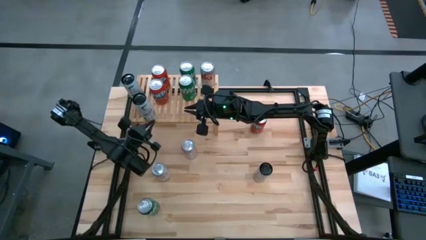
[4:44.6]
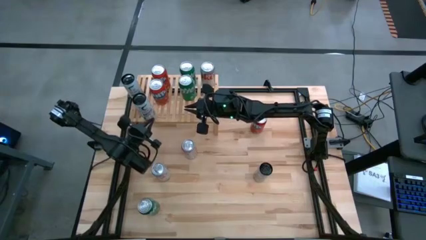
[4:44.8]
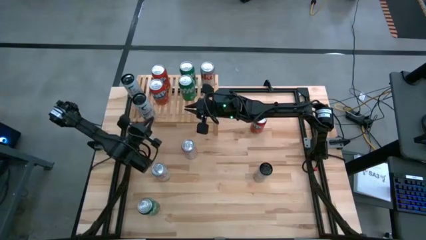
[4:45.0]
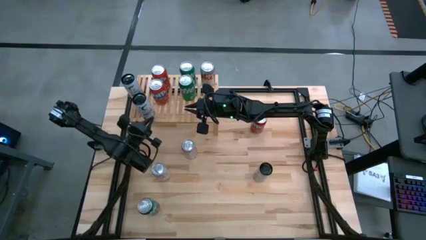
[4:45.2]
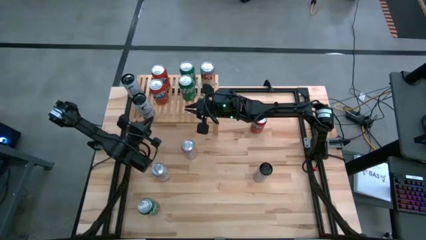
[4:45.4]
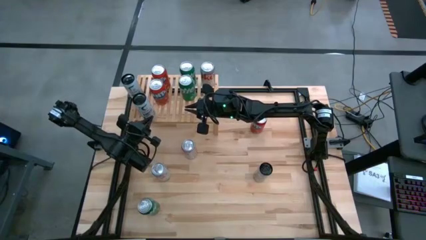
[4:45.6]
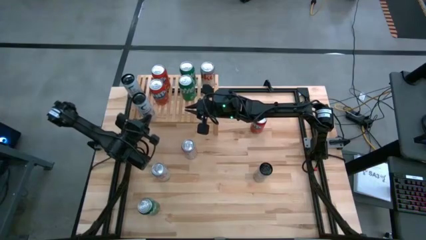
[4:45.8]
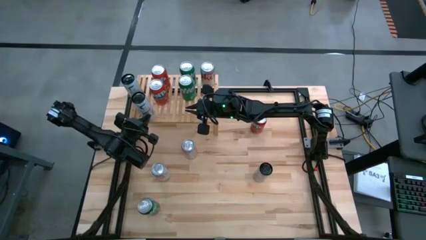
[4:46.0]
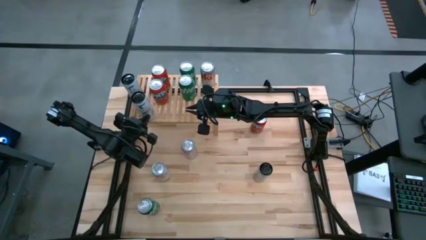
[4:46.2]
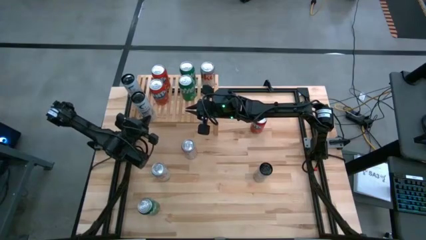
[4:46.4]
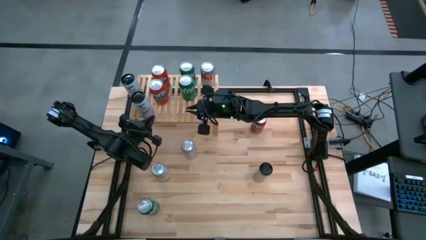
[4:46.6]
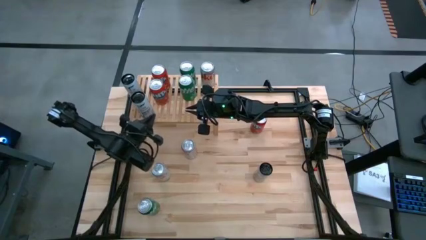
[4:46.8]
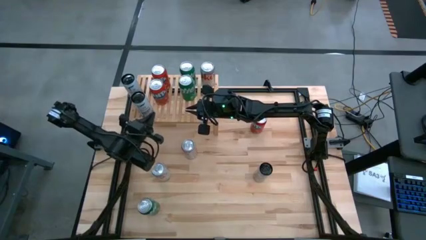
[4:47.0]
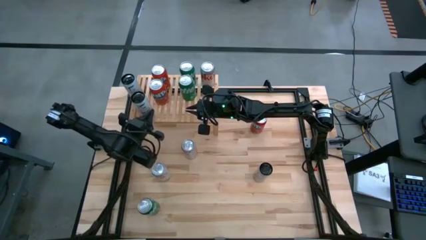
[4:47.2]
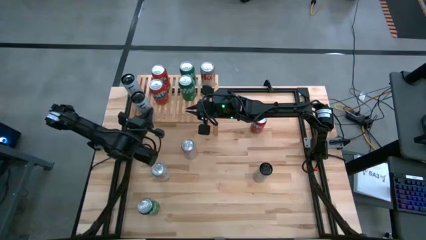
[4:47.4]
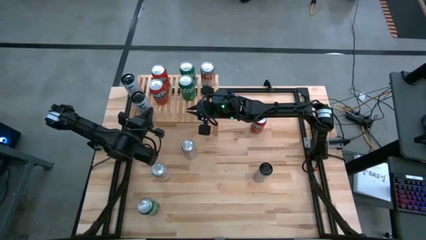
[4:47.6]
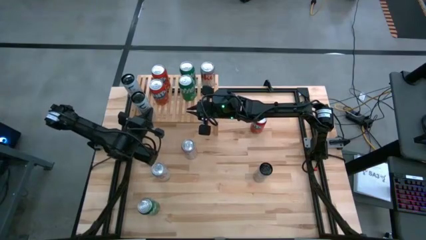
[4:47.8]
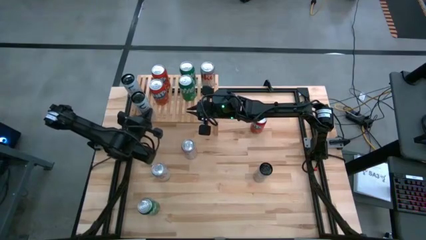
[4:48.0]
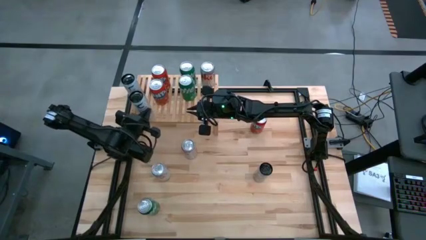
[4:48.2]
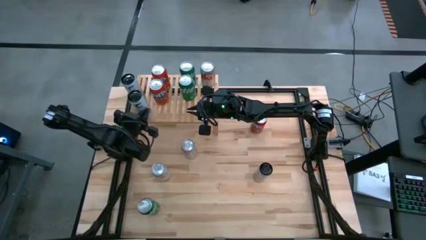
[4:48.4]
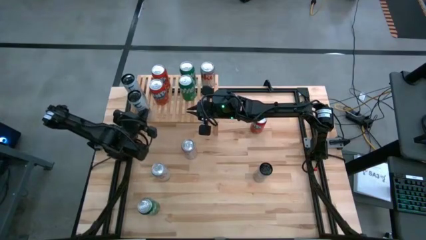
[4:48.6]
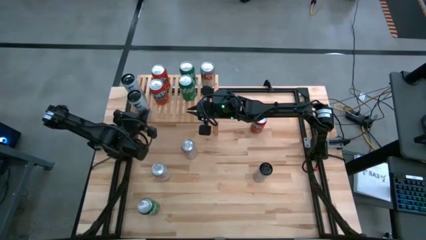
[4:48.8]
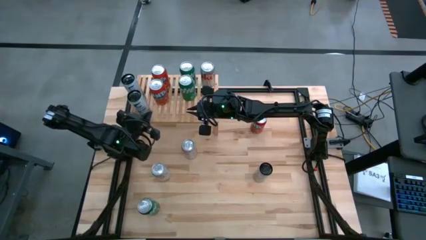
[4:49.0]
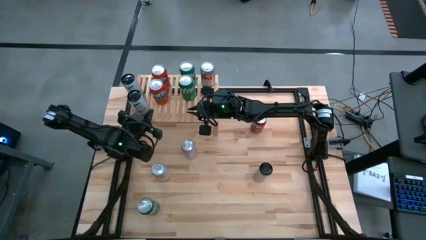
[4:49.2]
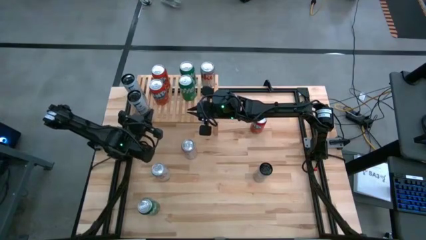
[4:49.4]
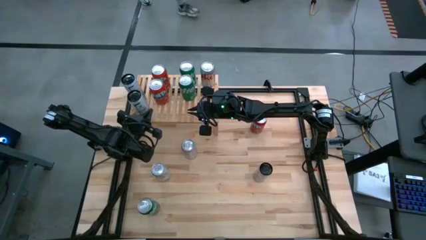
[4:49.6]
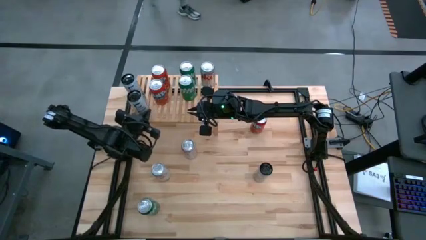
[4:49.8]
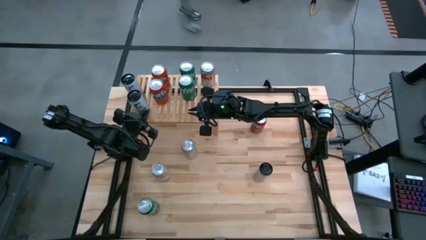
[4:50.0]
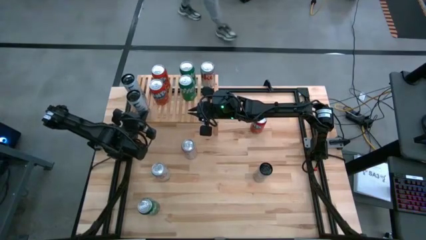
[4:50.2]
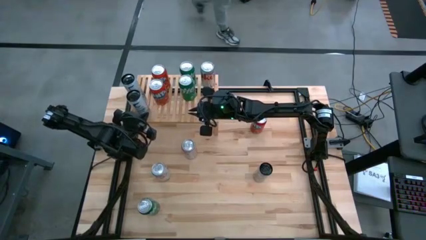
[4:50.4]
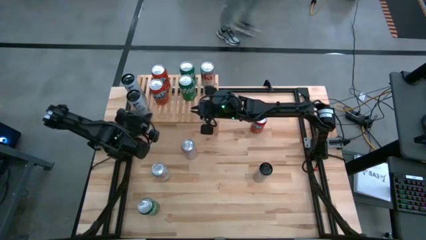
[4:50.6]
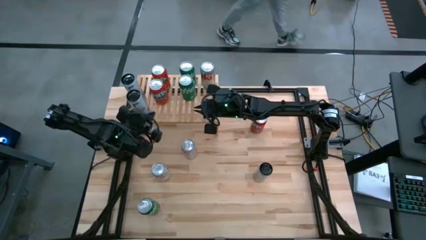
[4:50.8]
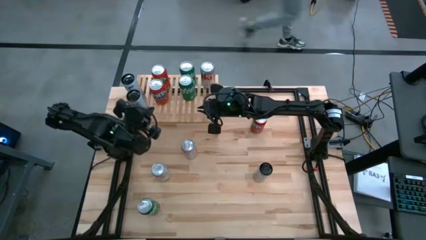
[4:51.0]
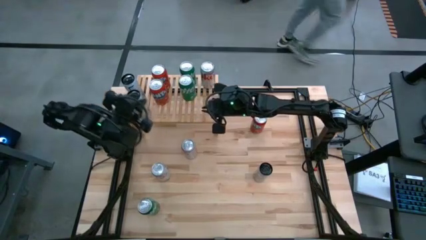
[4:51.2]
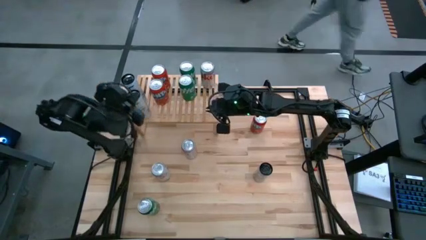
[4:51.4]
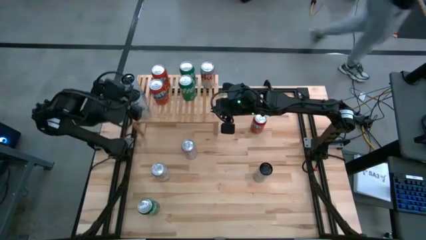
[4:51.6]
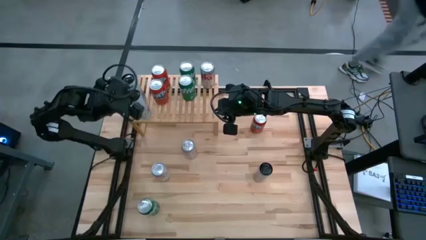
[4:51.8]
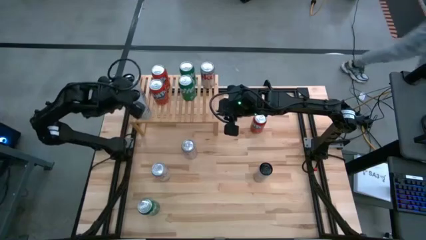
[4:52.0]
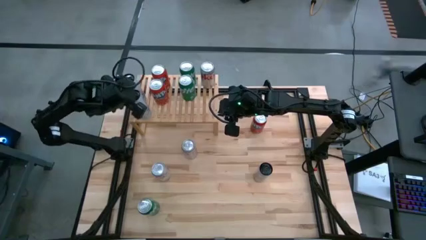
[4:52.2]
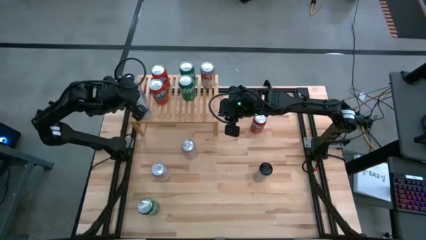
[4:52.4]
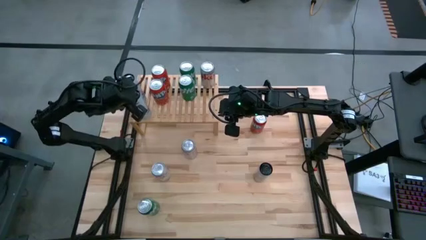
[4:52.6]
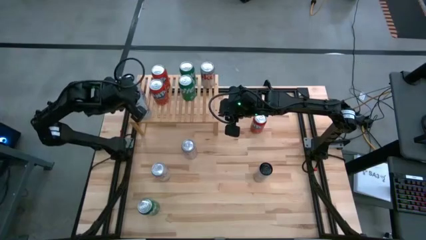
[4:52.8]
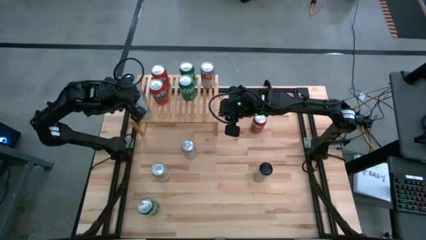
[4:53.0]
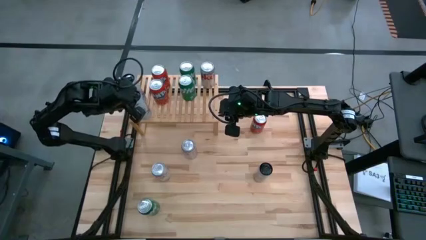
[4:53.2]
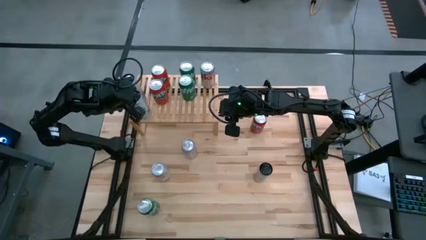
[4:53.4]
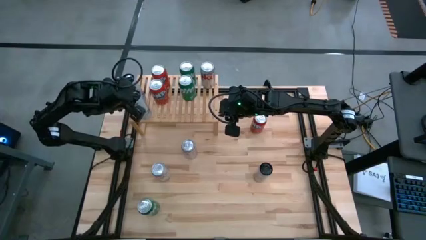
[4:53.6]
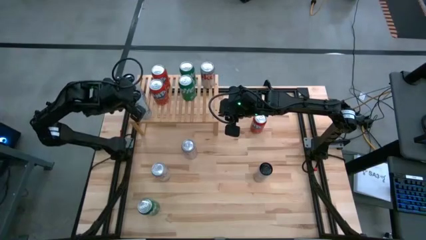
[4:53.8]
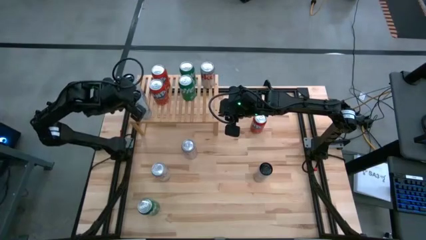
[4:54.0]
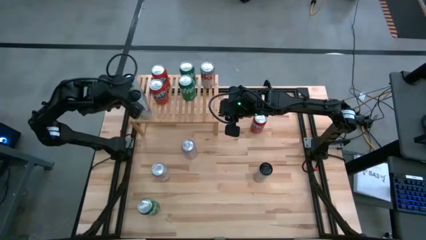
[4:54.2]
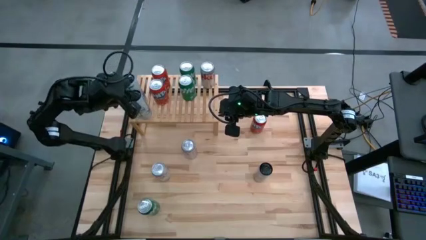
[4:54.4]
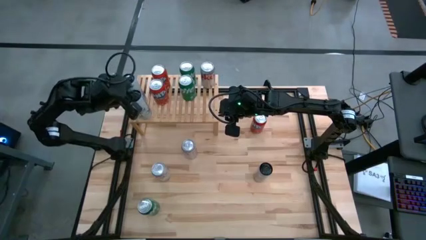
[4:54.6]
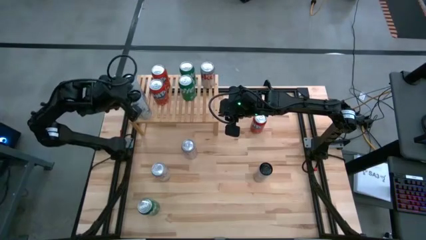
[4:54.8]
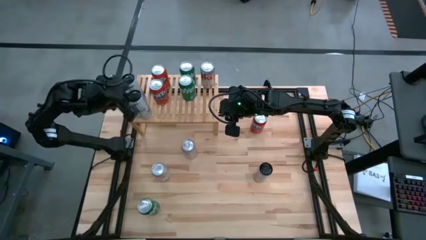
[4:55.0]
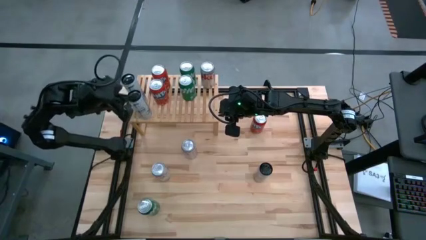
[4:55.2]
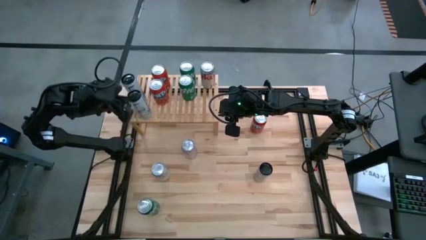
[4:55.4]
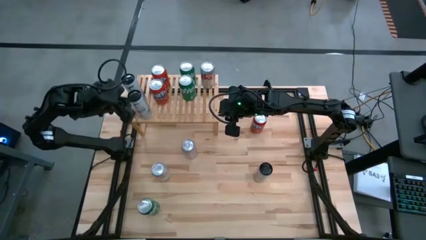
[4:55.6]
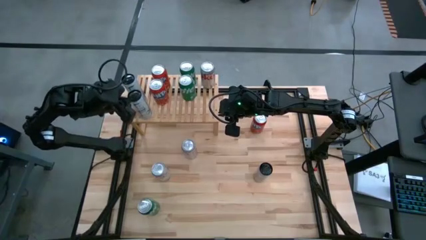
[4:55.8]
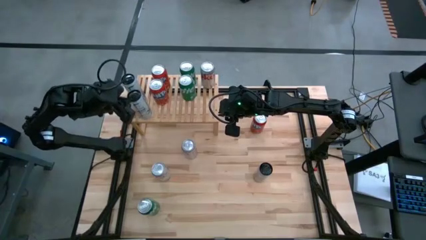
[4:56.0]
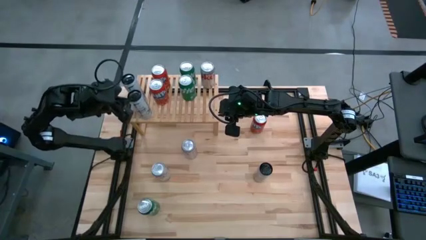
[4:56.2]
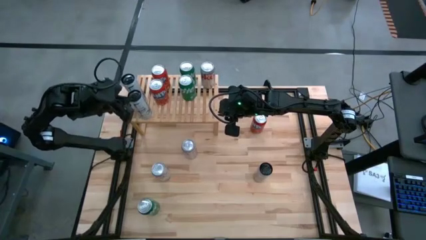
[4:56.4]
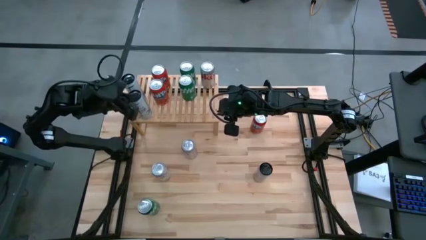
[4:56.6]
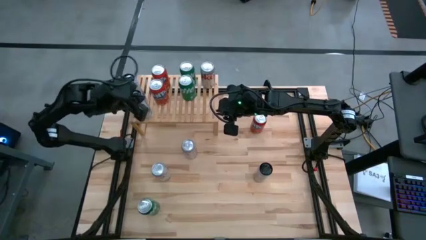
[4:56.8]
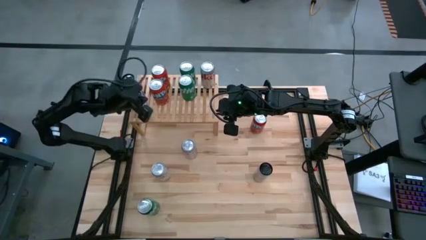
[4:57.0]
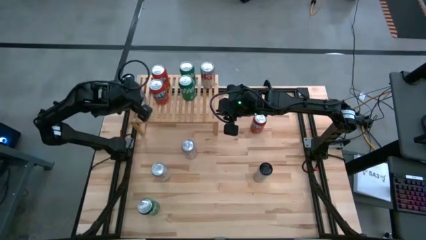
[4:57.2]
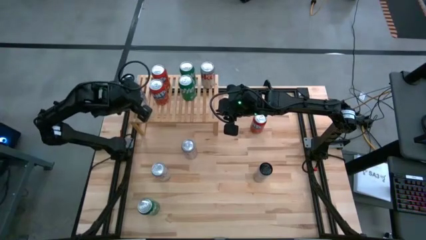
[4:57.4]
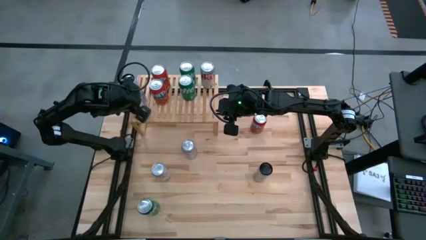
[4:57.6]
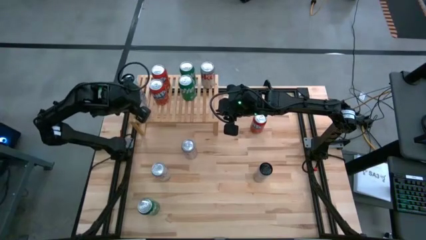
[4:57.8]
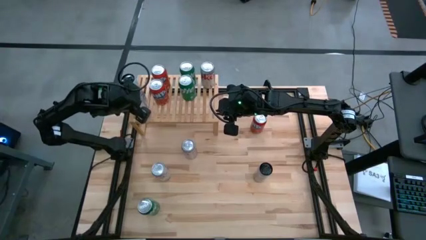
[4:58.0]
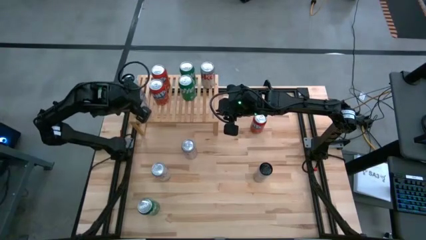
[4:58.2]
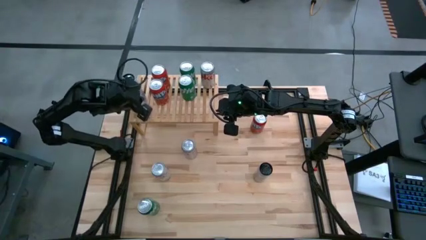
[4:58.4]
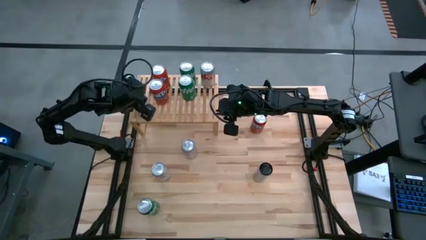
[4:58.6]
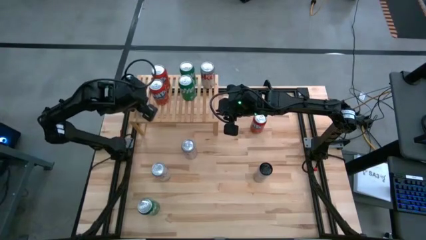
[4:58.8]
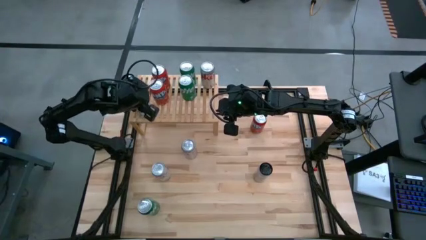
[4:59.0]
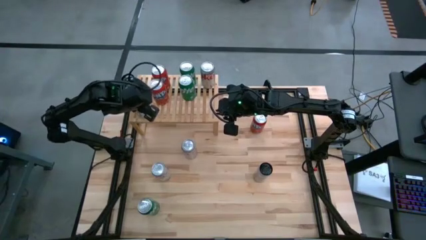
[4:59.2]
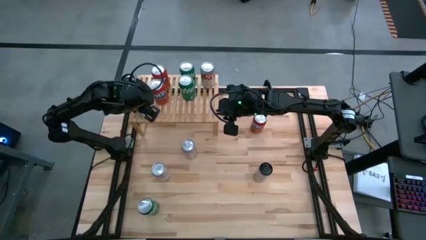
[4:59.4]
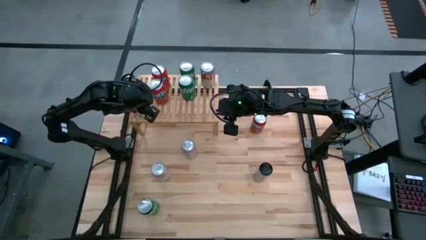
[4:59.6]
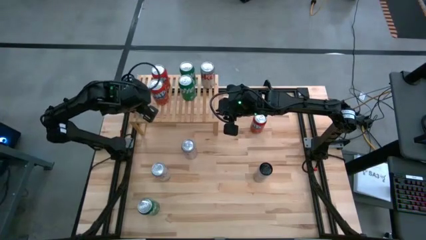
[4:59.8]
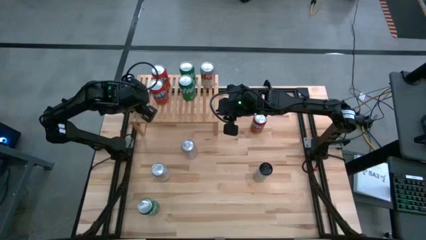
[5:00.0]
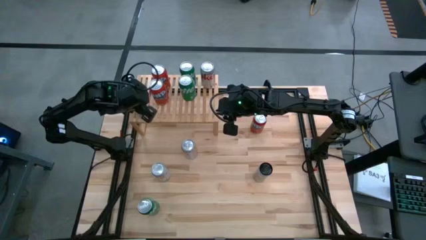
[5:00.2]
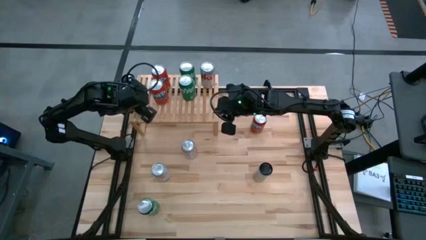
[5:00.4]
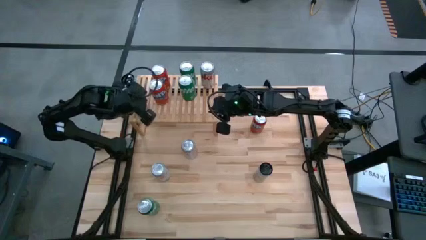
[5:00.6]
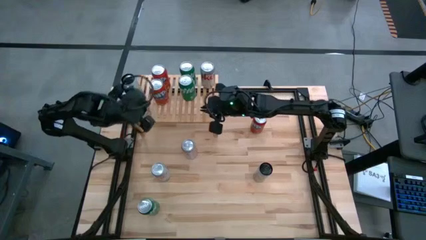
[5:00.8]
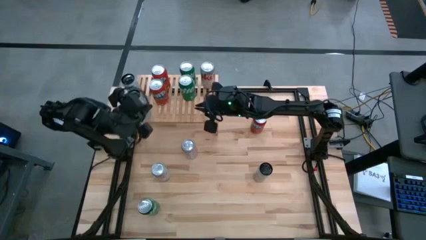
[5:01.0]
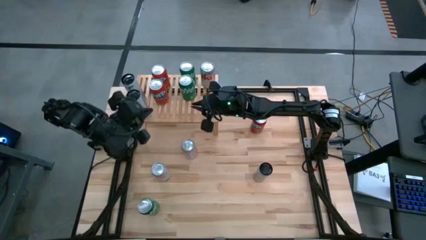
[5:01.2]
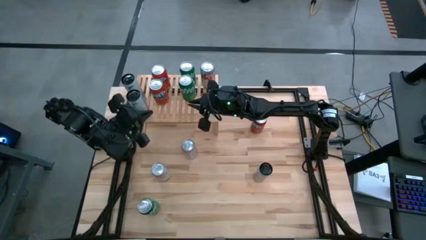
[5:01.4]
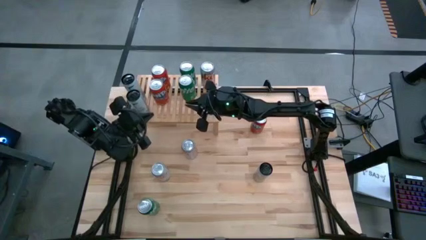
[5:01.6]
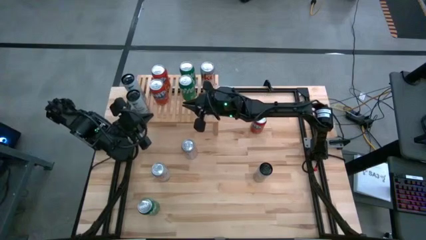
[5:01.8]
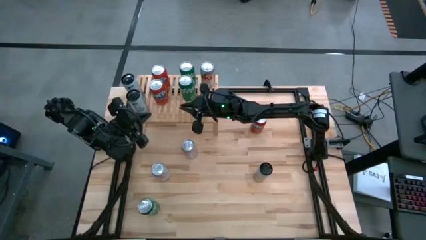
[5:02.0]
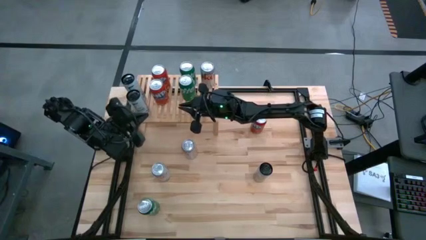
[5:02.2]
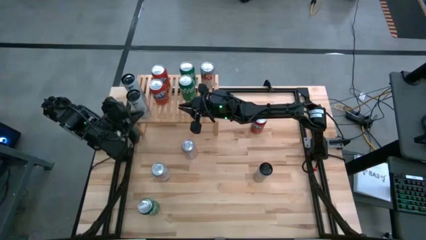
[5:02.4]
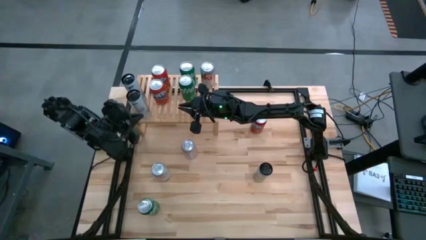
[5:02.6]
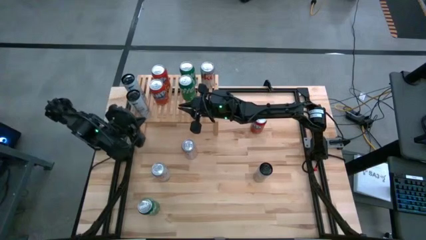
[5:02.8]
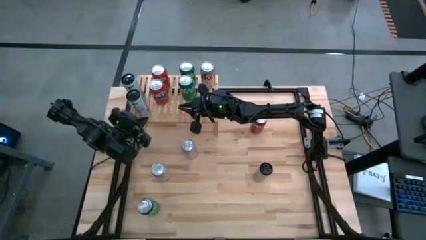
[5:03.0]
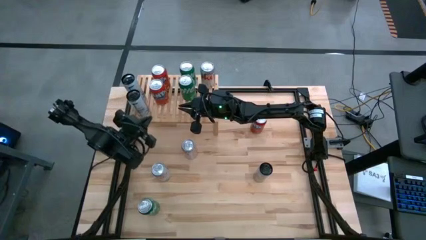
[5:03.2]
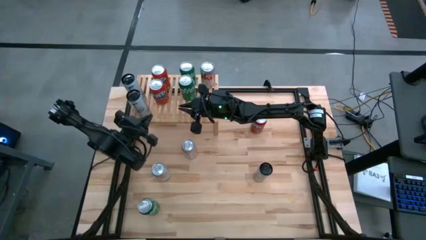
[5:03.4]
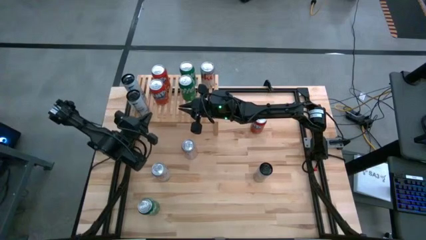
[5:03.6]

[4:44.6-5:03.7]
Task: Place canned beverage on shelf
Put the top white/blue soda can on the shelf aligned with the other white/blue soda can
